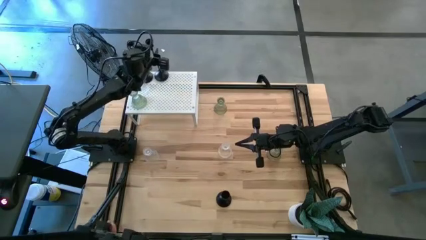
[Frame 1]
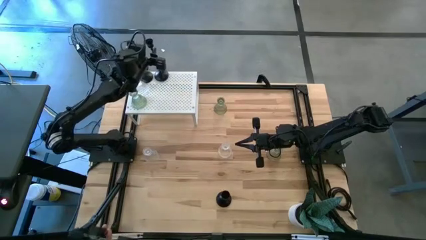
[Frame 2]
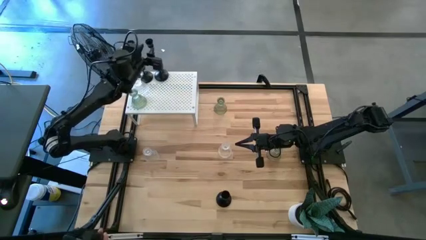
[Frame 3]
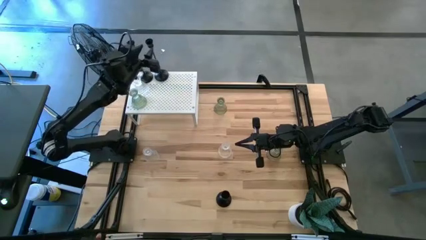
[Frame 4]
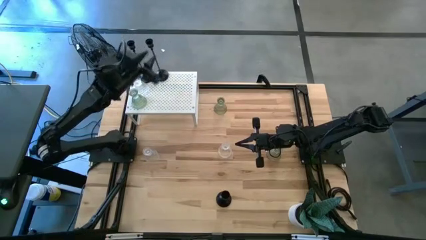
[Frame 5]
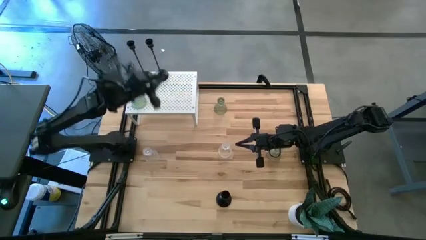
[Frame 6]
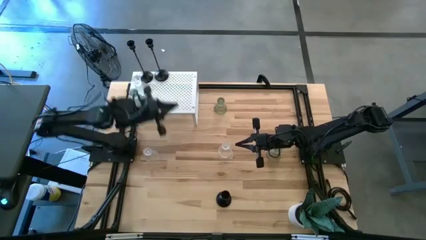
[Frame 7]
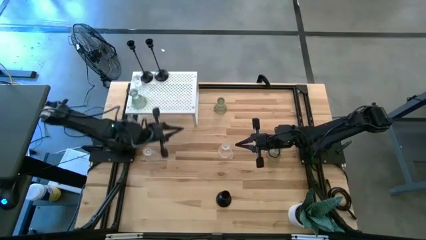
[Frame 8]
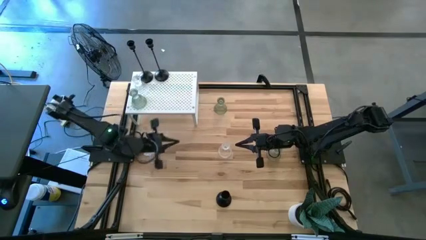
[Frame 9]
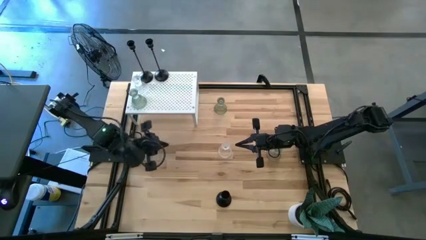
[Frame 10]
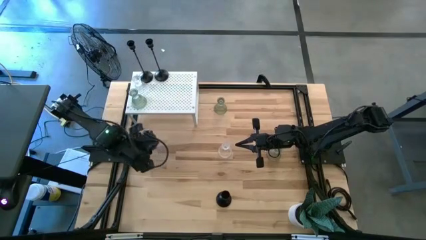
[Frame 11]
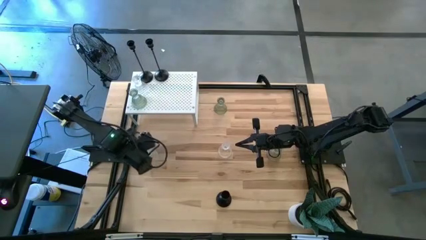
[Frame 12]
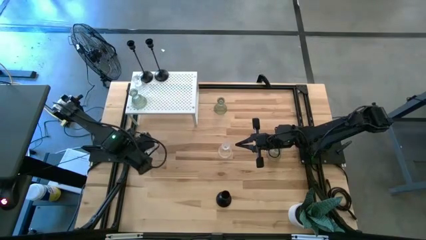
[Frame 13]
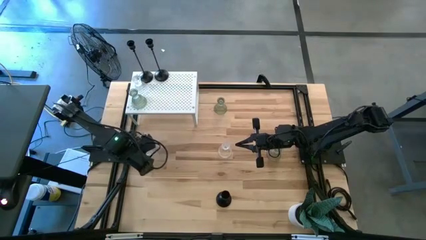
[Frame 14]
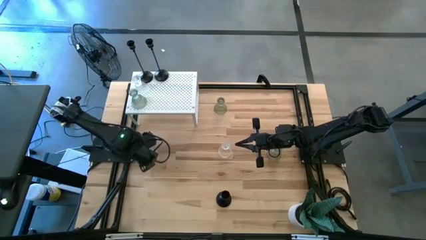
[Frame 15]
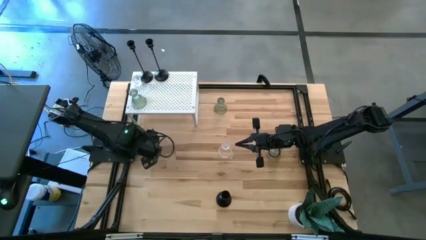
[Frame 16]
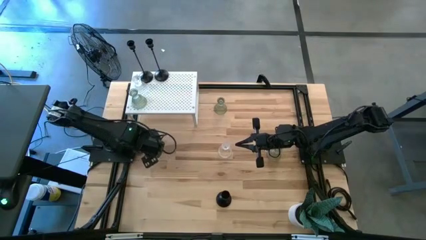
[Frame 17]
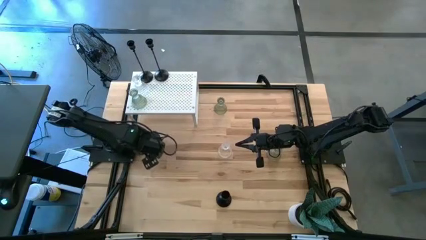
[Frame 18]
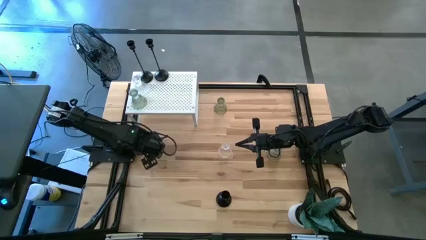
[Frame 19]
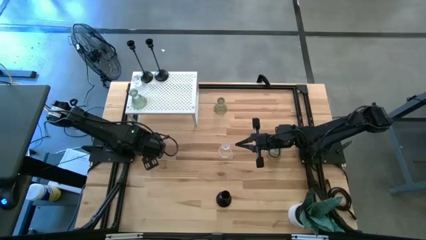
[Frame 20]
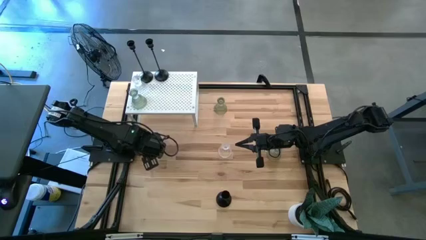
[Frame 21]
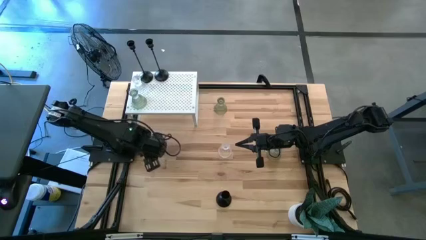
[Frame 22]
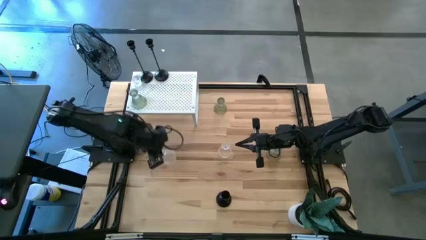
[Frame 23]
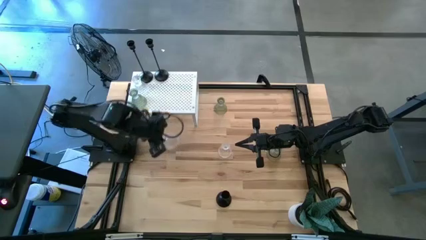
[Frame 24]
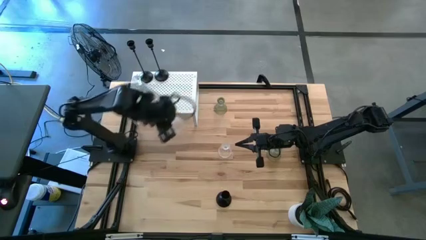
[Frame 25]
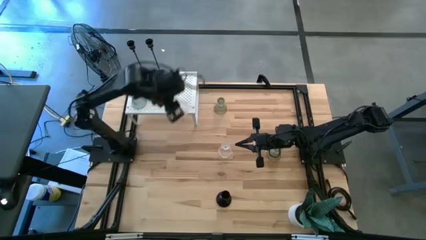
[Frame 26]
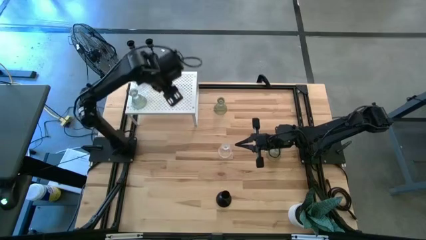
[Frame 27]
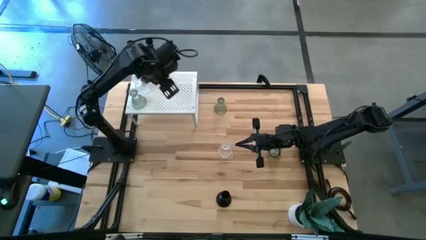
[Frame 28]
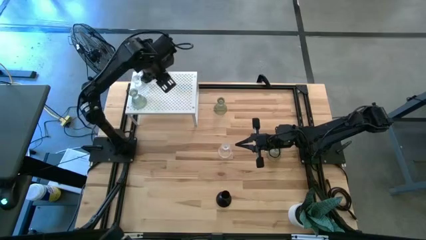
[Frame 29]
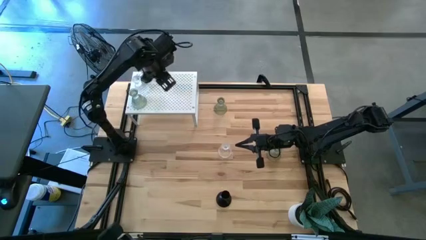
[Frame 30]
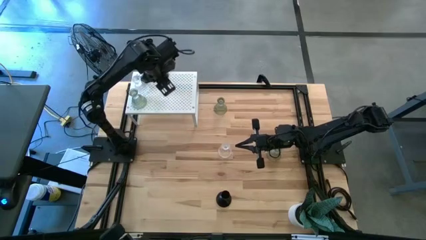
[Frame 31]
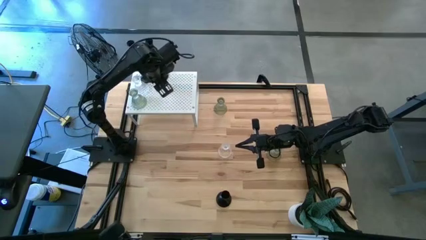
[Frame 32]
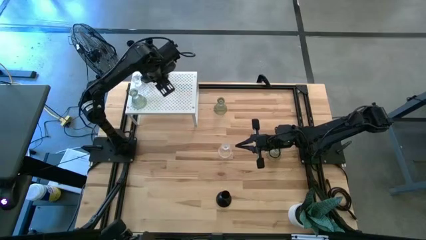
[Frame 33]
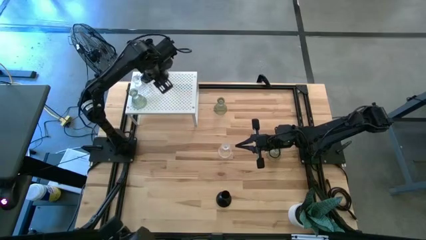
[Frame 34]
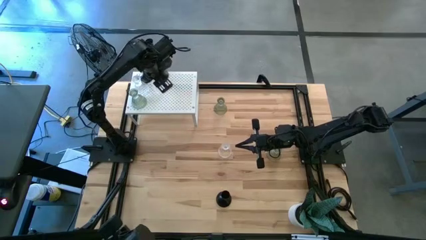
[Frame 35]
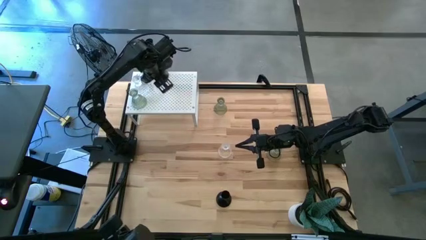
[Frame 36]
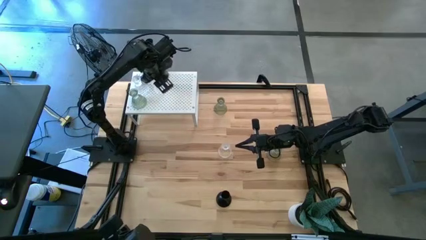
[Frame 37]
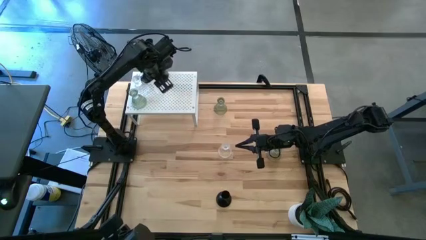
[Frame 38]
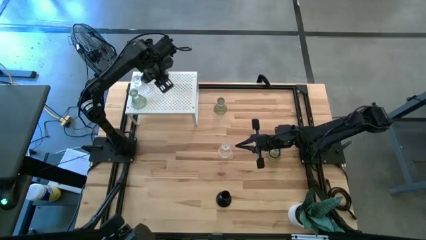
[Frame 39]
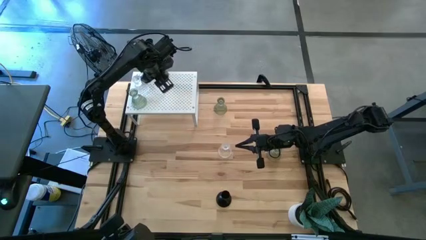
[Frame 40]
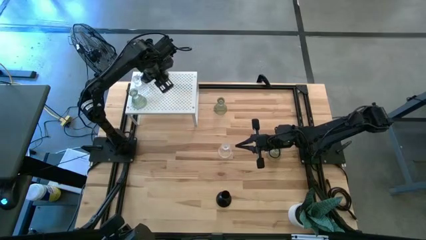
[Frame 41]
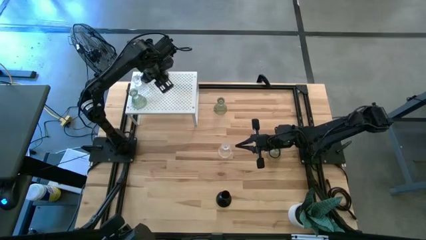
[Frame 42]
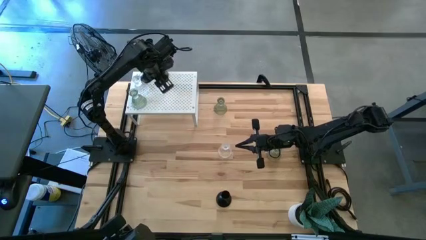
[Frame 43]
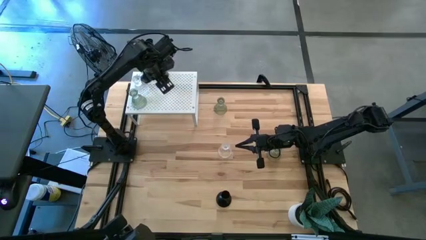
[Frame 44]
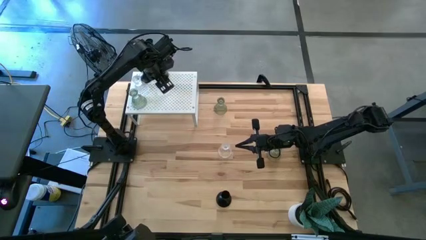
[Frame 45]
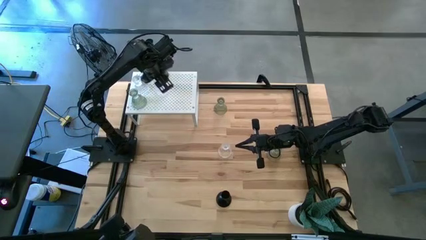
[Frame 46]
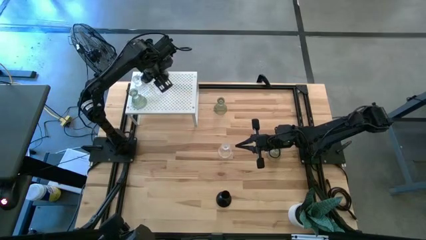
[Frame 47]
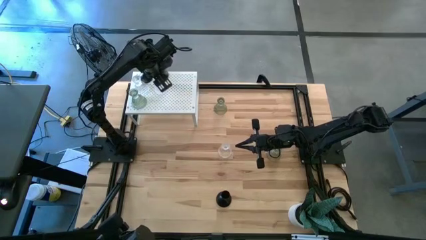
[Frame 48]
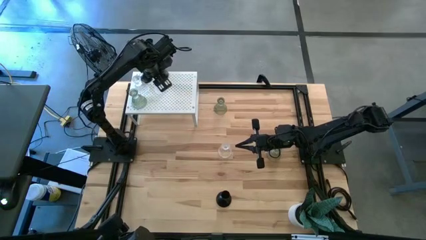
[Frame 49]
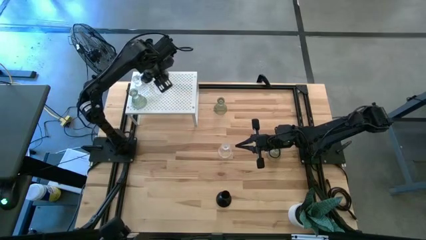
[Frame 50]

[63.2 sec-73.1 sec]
Task: Pick & Place candle stick holders
Put the left transparent candle holder on the shelf aligned with the transparent candle holder

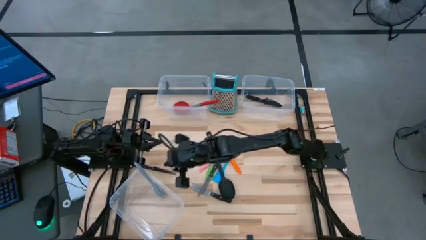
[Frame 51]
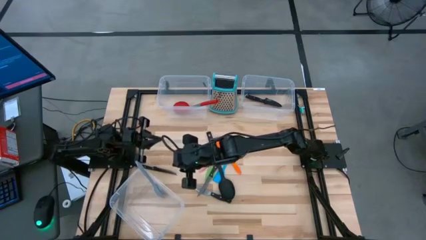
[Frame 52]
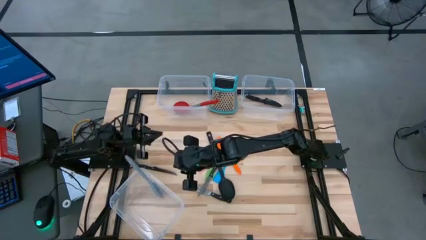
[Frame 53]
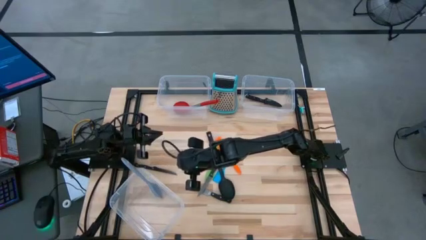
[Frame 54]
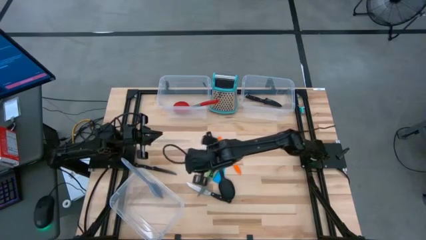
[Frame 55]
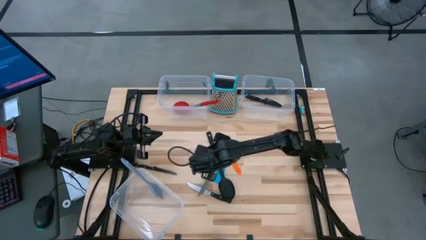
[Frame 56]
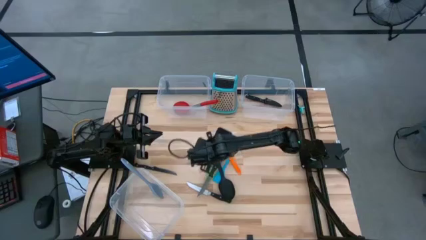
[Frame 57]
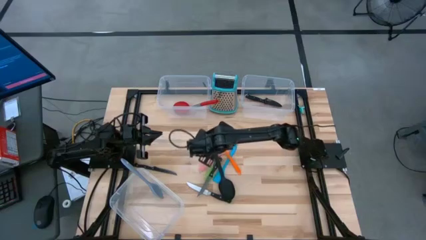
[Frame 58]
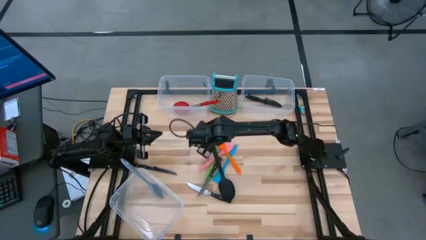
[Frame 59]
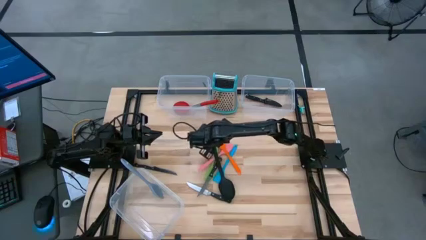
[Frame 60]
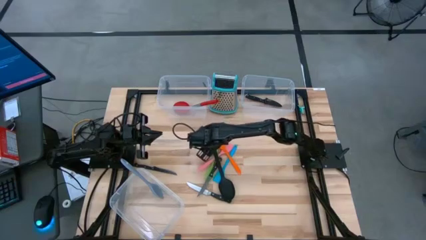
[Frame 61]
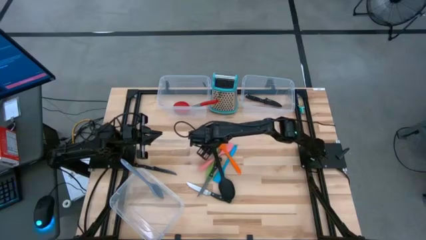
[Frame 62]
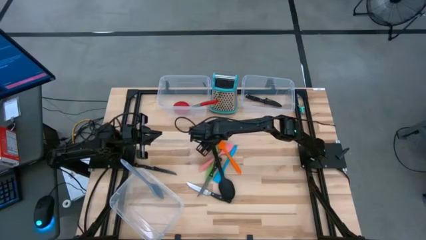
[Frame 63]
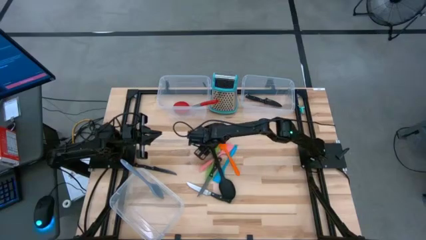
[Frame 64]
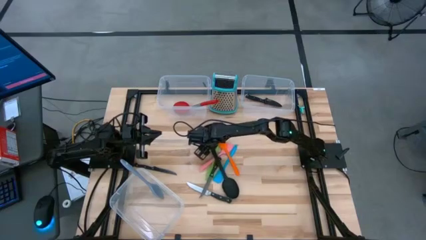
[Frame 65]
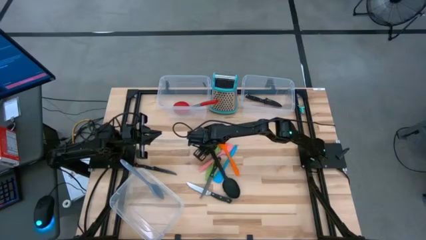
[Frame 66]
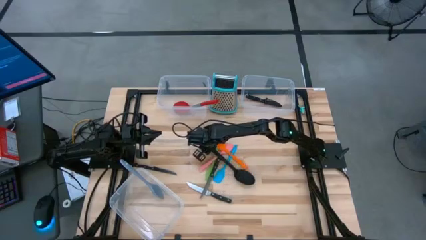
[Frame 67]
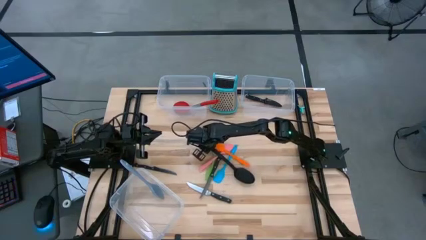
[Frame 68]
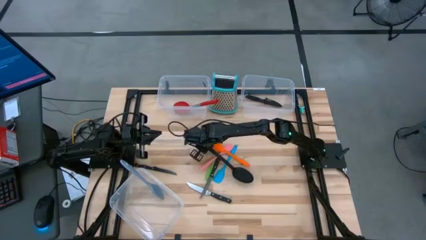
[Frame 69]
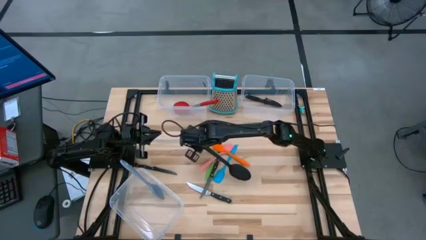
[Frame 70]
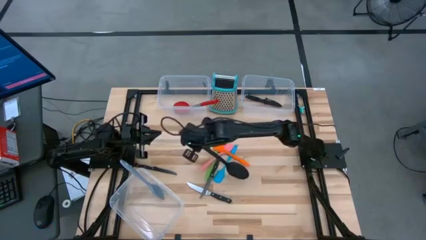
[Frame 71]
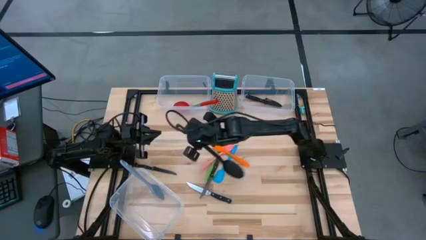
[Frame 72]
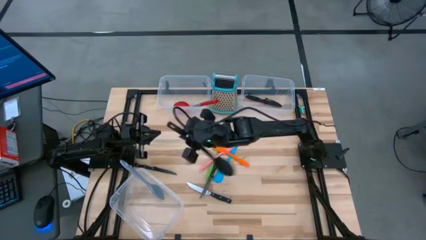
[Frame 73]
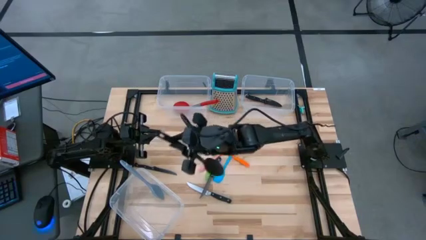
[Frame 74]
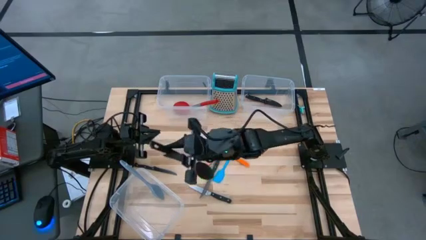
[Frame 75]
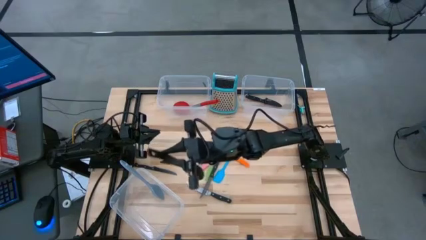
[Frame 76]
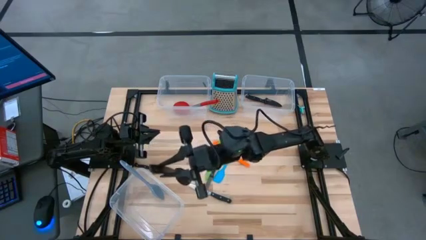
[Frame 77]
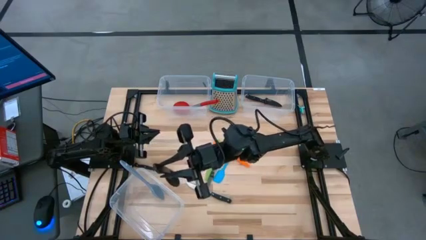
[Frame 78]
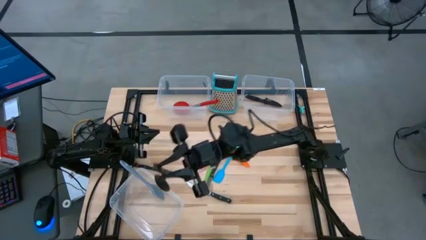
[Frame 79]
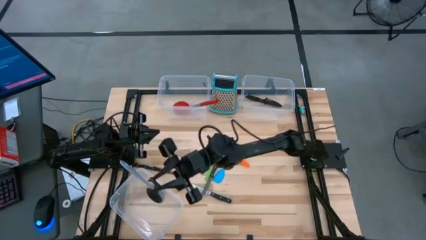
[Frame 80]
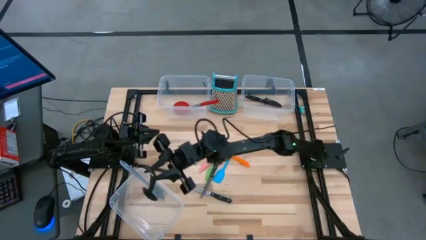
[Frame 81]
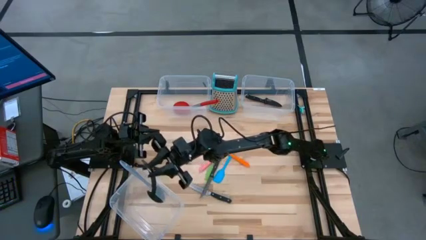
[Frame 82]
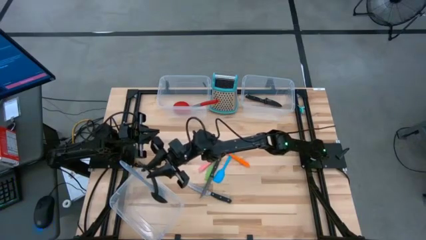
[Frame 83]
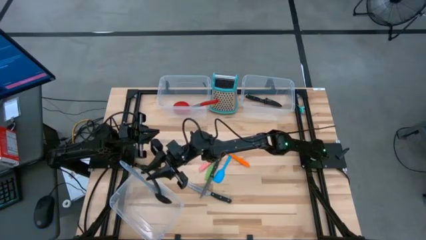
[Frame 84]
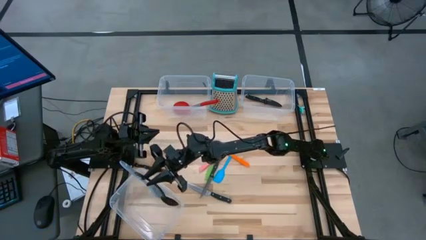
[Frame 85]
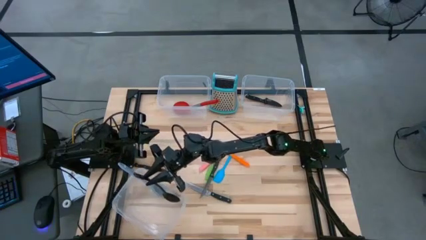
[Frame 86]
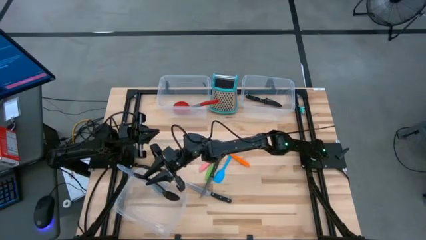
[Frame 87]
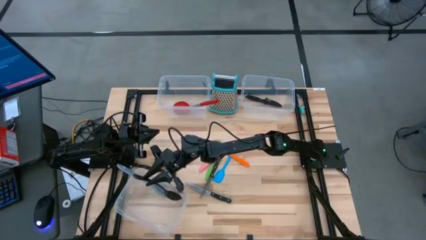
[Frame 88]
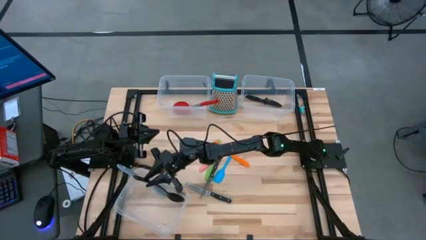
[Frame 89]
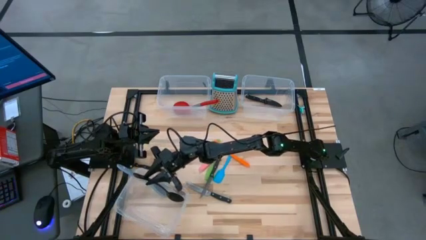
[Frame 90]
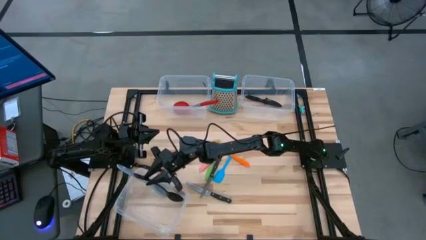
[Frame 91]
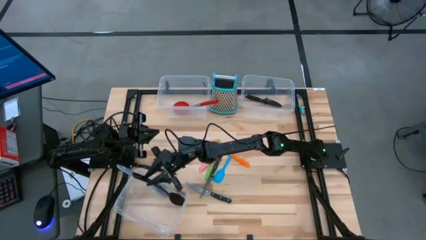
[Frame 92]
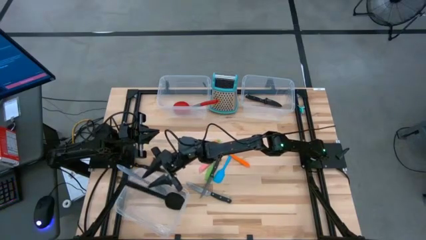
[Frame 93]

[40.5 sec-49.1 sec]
Task: Pick & Place Kitchen Items
Put the black serving spoon into the bottom transparent bin
